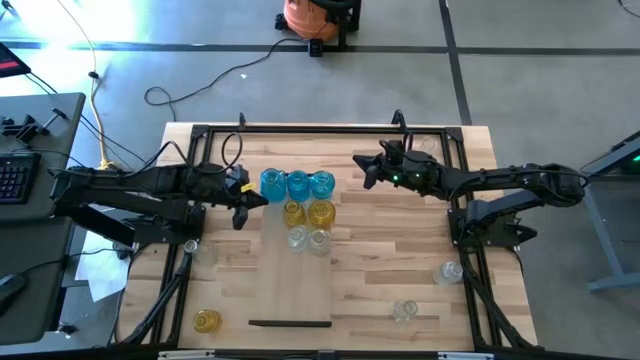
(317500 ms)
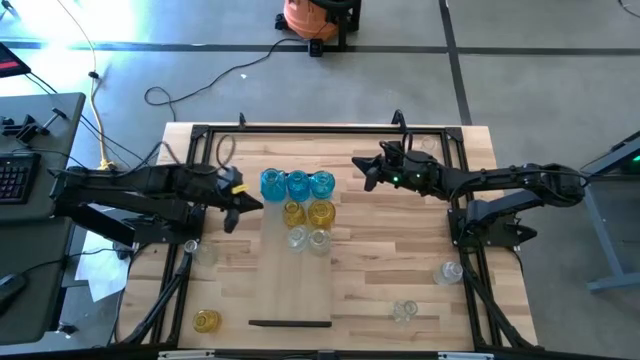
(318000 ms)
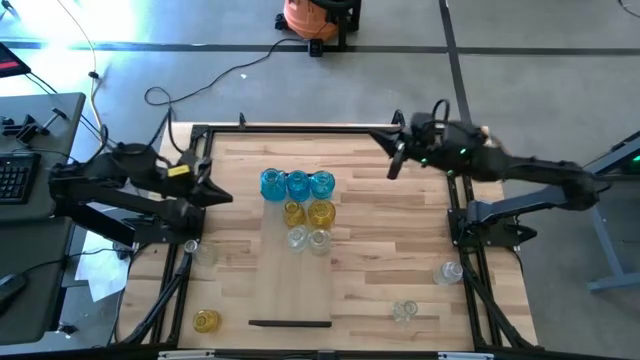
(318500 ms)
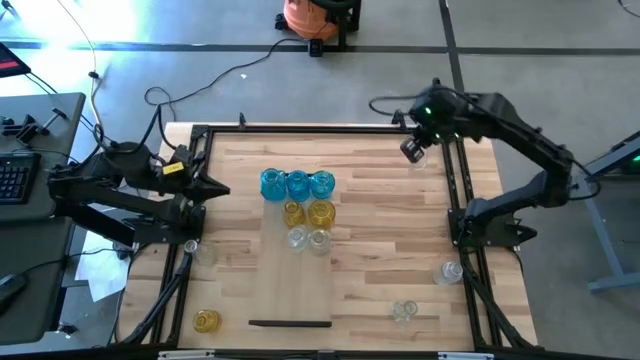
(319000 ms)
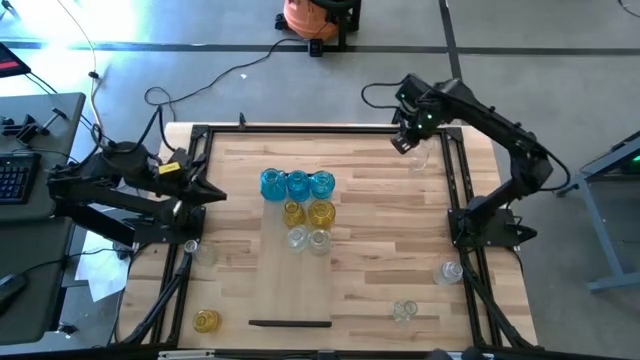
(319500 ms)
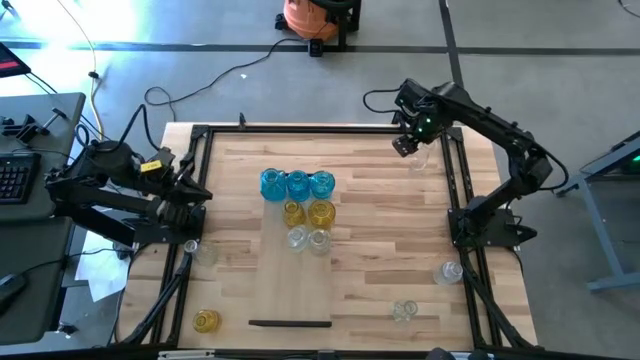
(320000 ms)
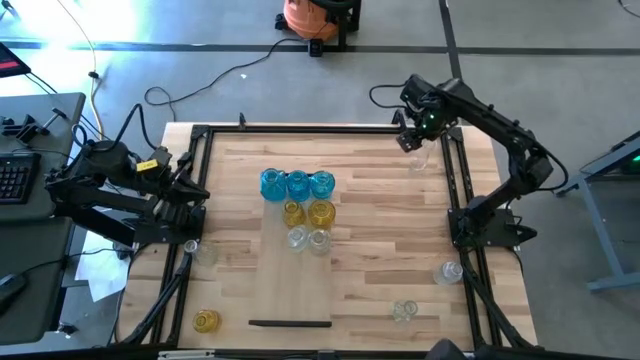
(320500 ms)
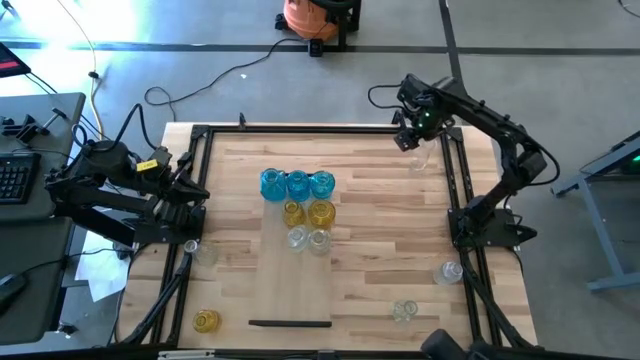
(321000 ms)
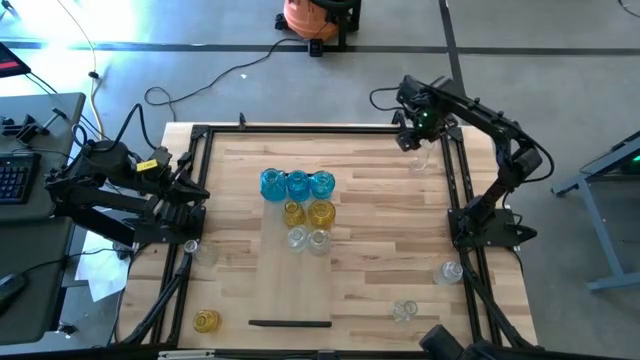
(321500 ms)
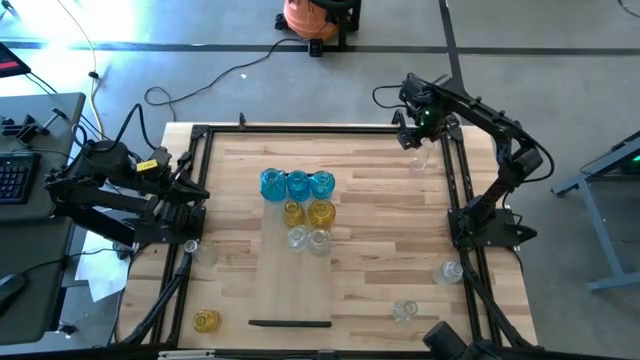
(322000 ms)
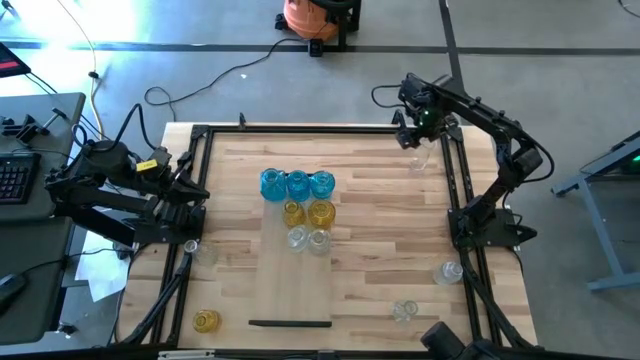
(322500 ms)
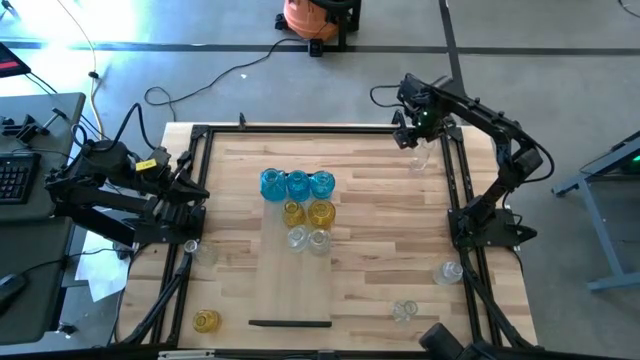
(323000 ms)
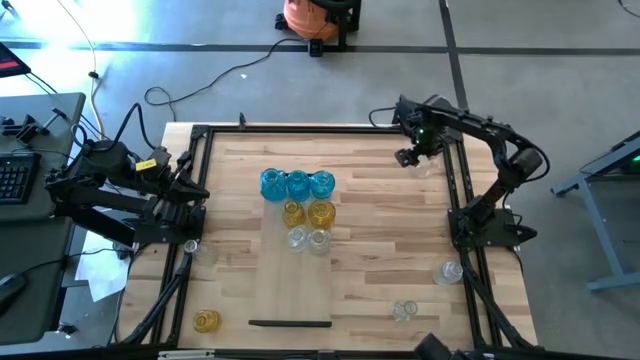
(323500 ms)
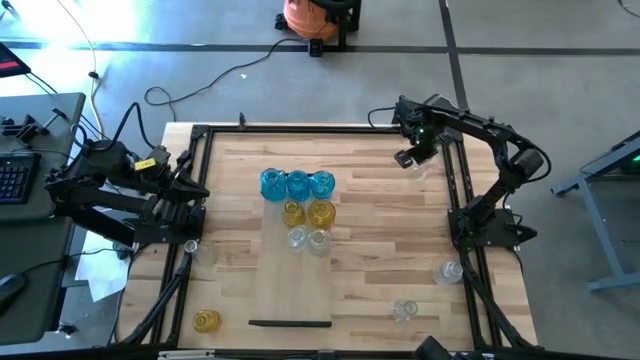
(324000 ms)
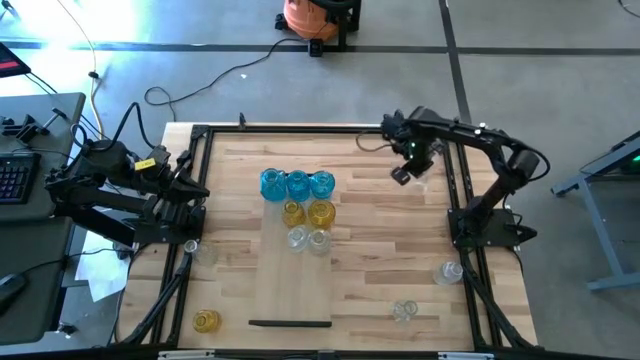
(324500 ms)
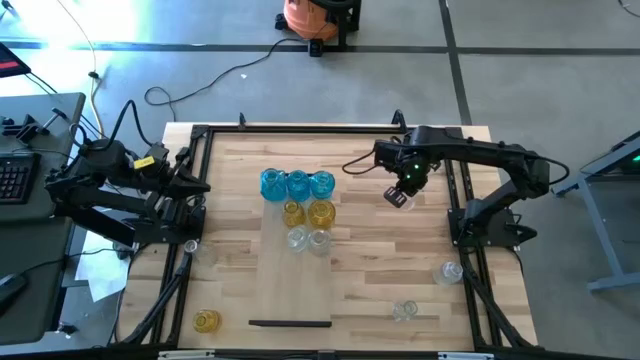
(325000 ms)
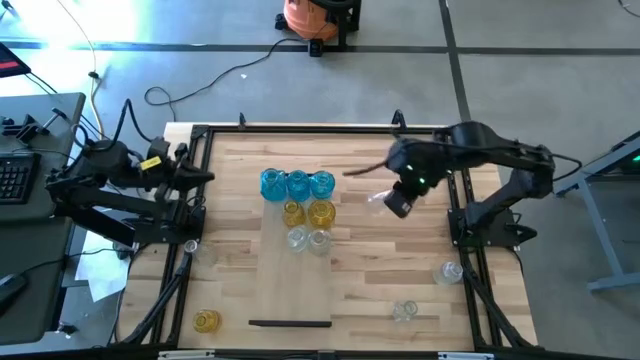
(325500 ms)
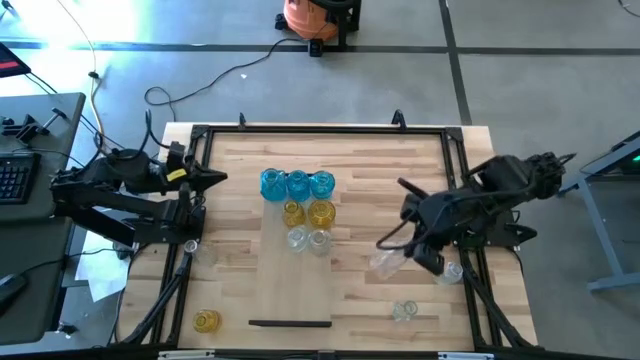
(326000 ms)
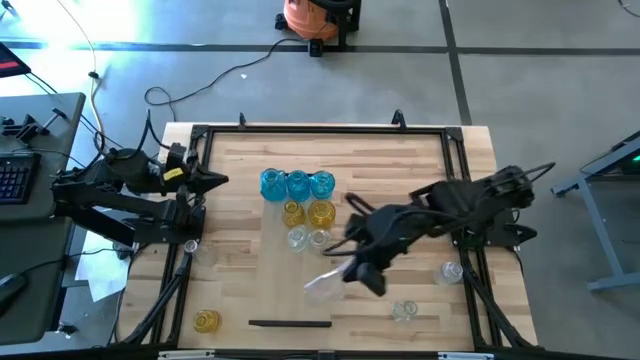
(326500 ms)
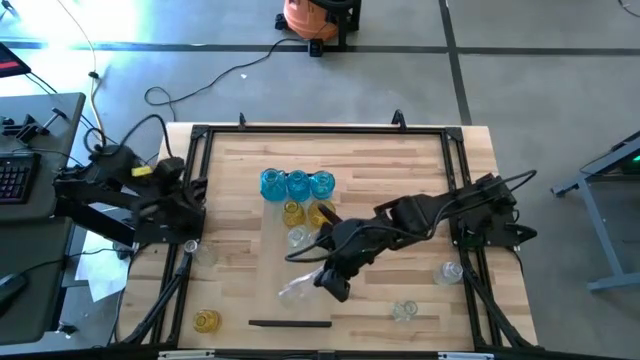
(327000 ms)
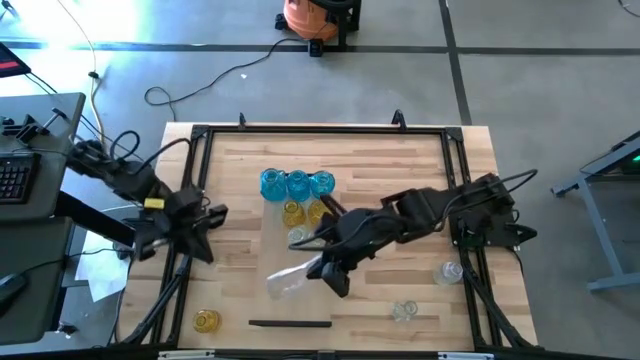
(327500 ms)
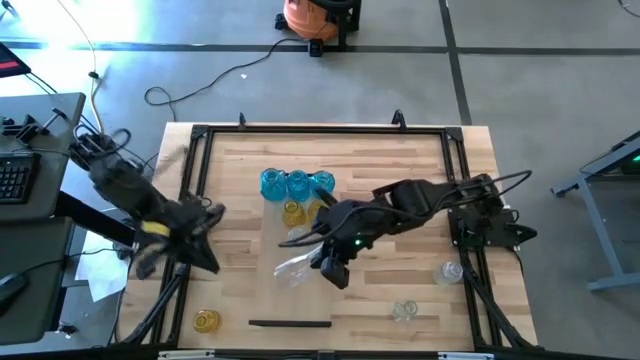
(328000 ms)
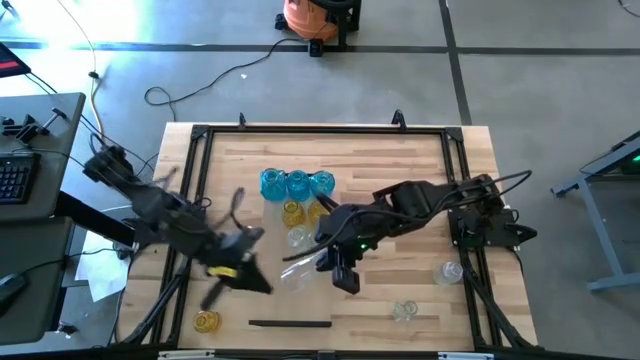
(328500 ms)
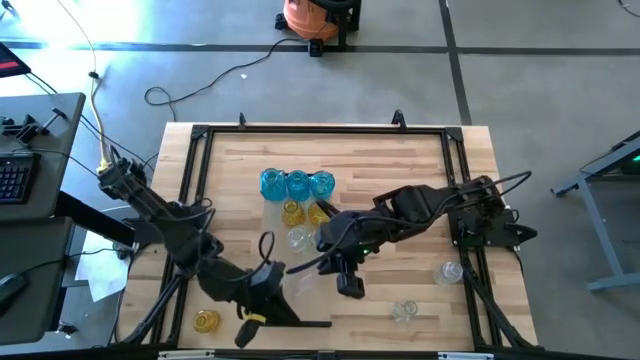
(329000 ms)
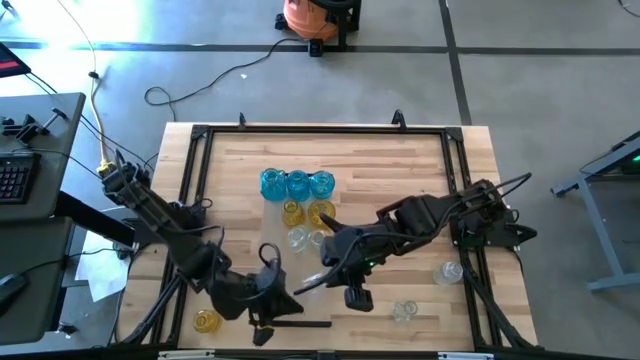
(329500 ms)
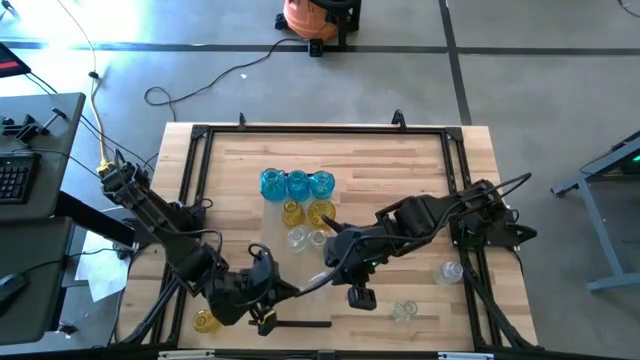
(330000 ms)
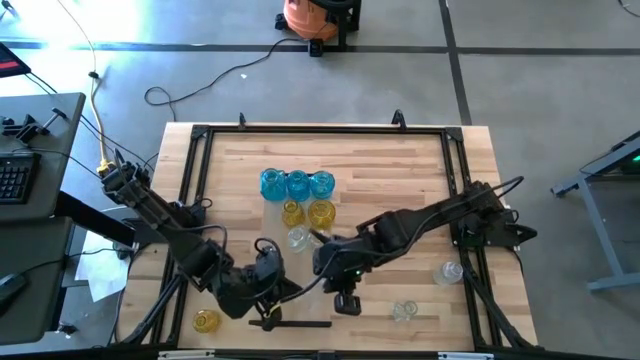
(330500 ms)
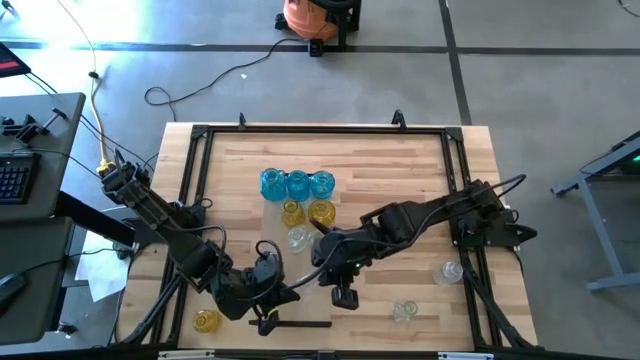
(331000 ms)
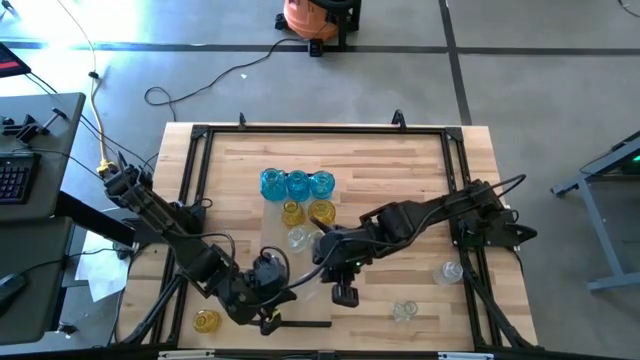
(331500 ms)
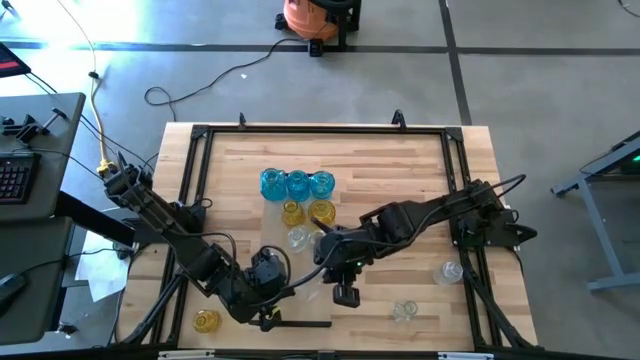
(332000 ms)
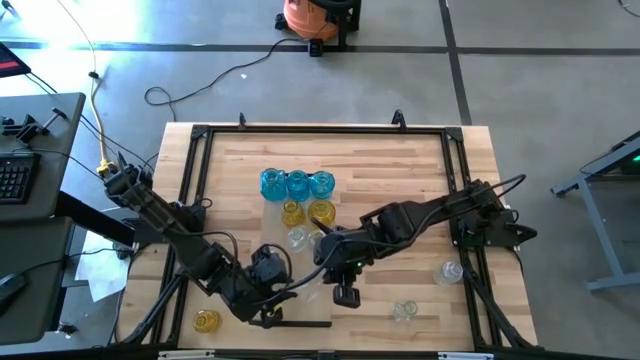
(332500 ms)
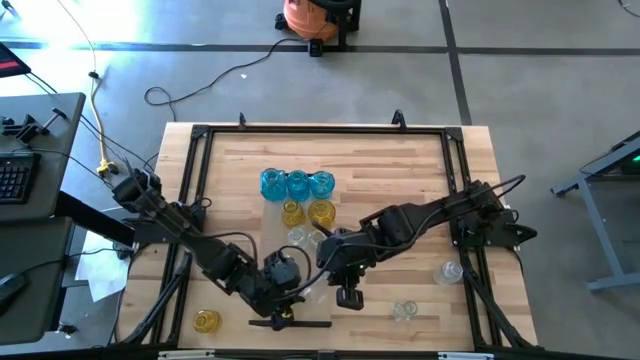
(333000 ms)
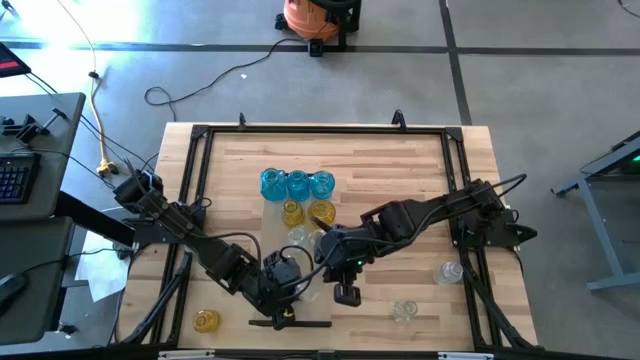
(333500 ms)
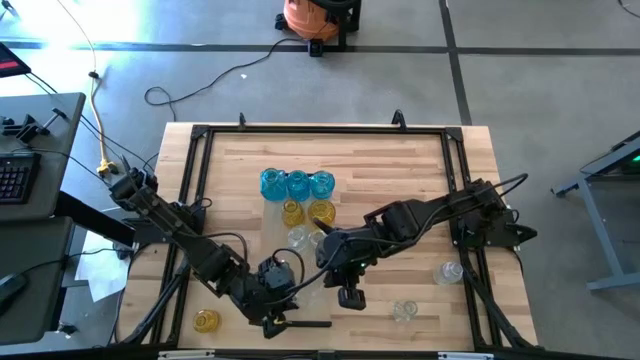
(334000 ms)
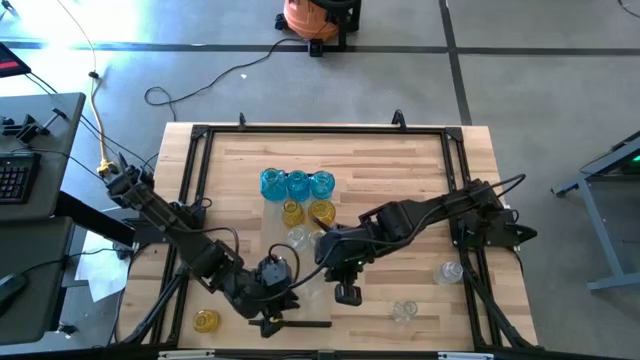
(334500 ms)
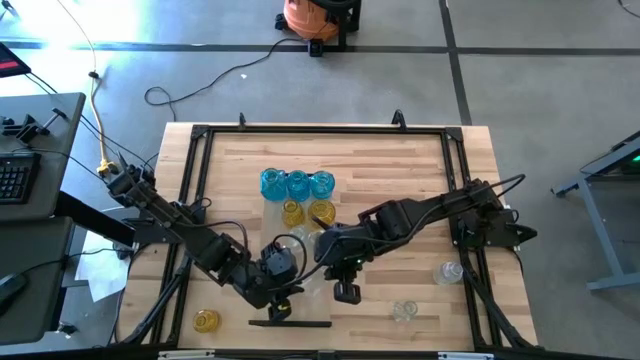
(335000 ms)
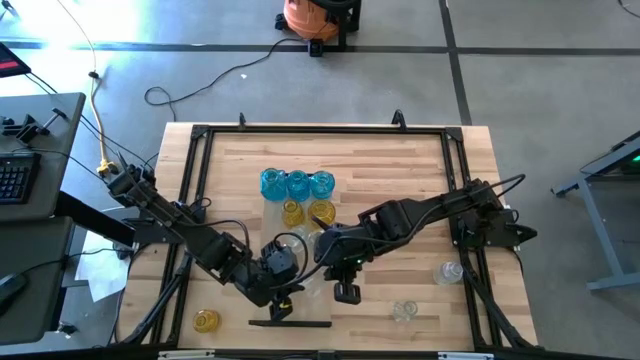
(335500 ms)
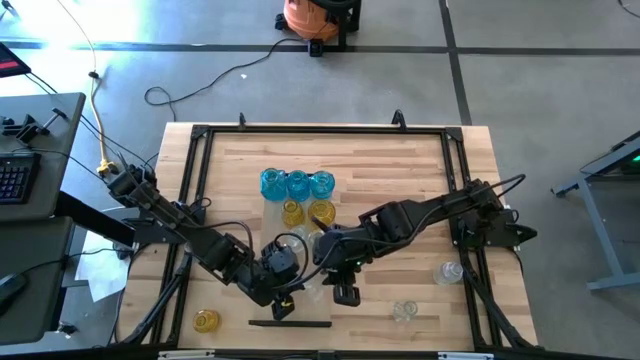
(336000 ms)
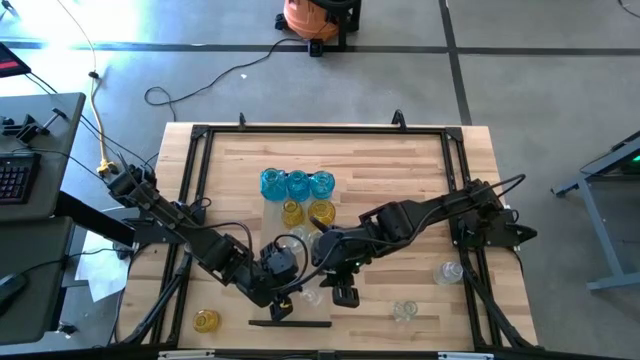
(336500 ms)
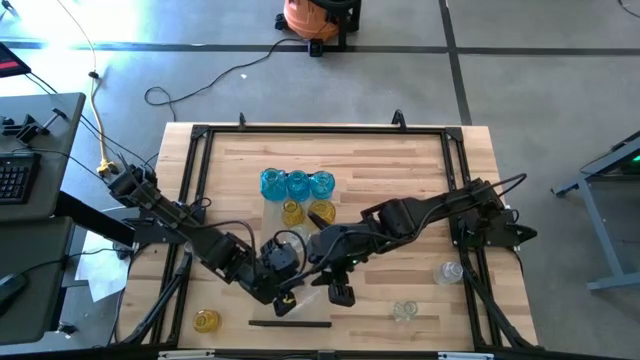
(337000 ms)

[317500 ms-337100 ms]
Task: sort vases onto shelf
Put the top transparent vase on the shelf to align with the other transparent vases

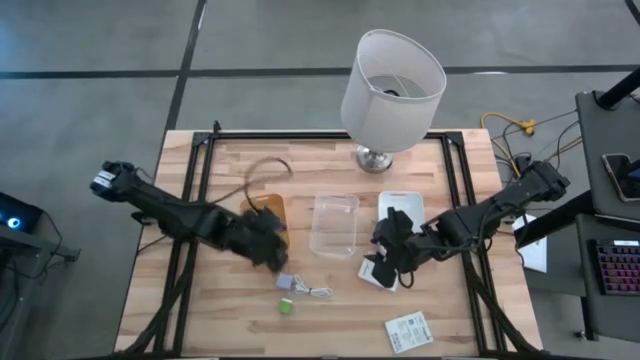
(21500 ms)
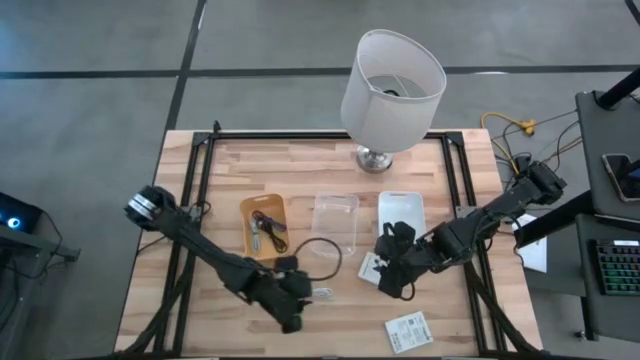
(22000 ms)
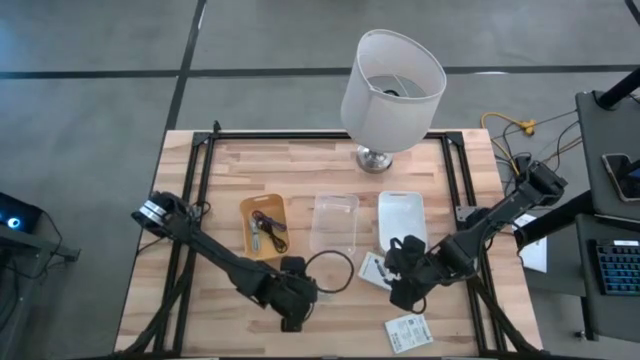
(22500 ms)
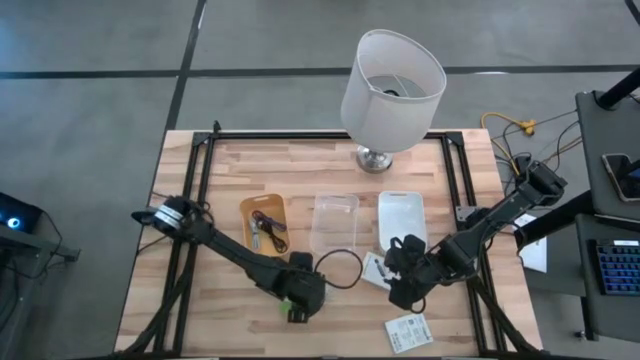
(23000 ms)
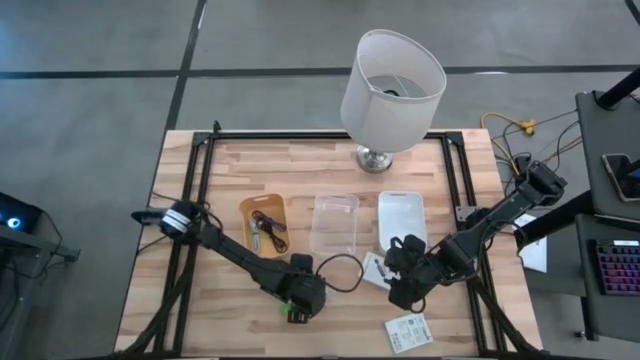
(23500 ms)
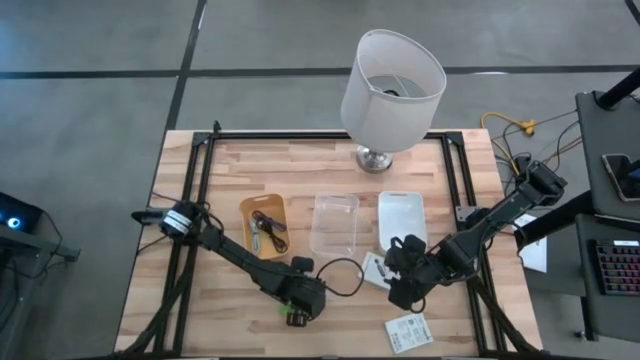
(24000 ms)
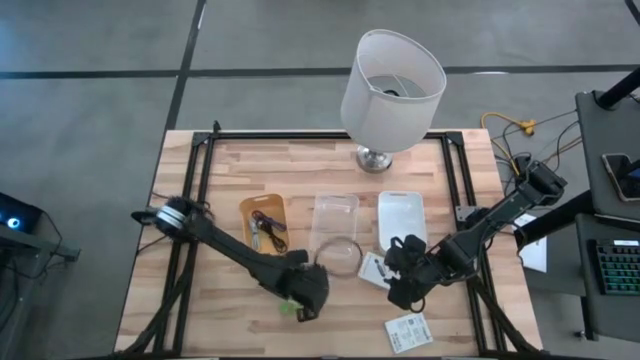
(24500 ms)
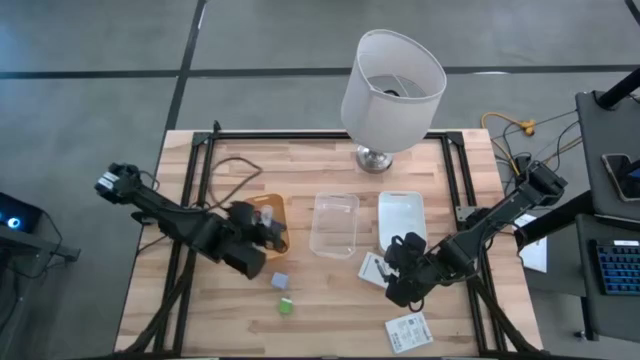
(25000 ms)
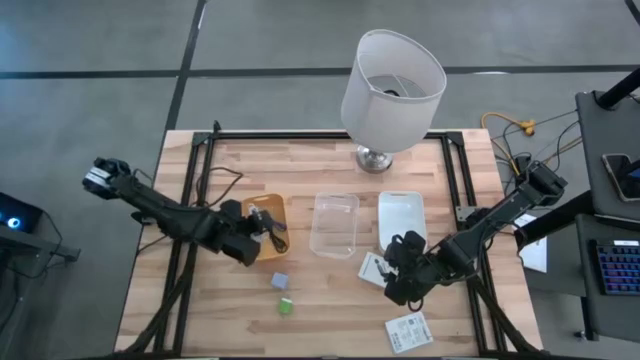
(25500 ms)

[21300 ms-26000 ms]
Task: Pick and place items into bin
Put the white charger cable into the yellow bin
